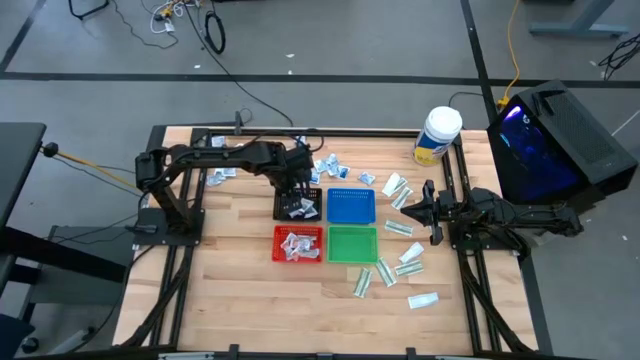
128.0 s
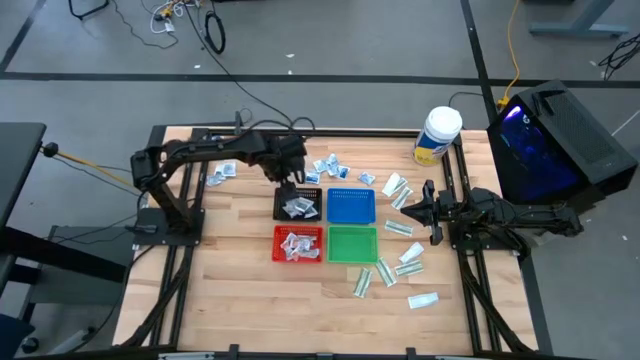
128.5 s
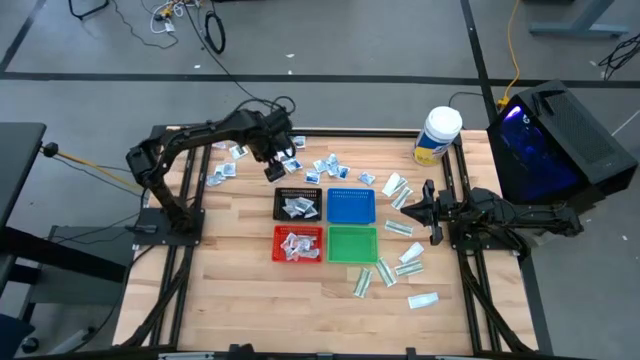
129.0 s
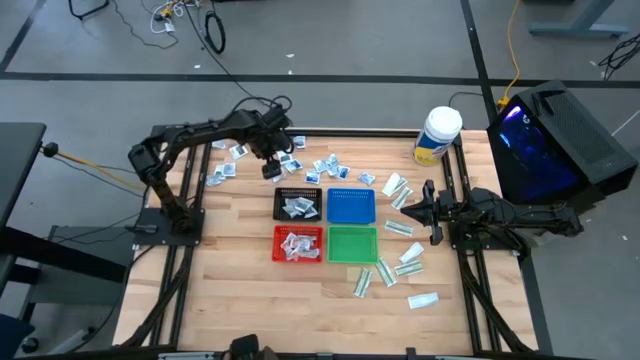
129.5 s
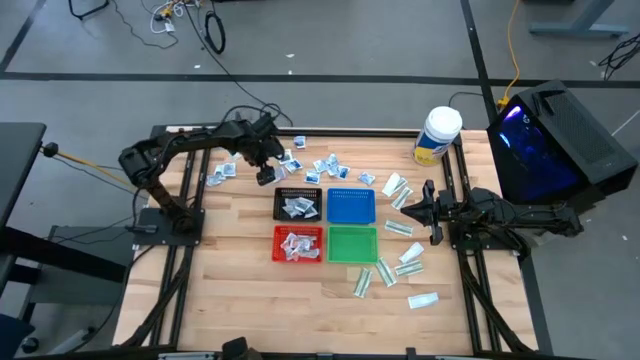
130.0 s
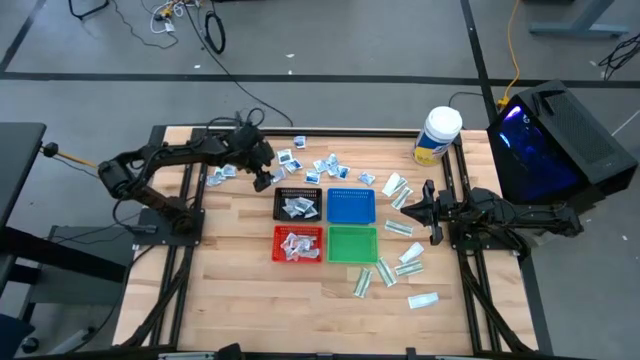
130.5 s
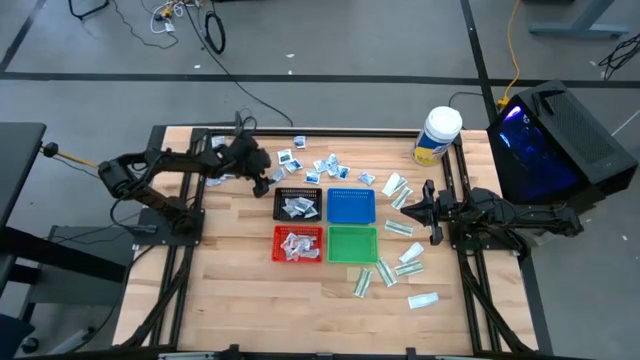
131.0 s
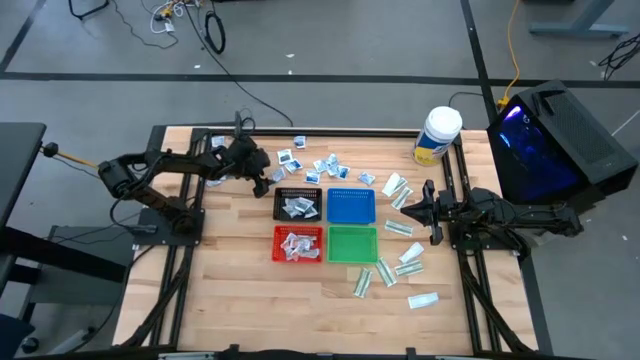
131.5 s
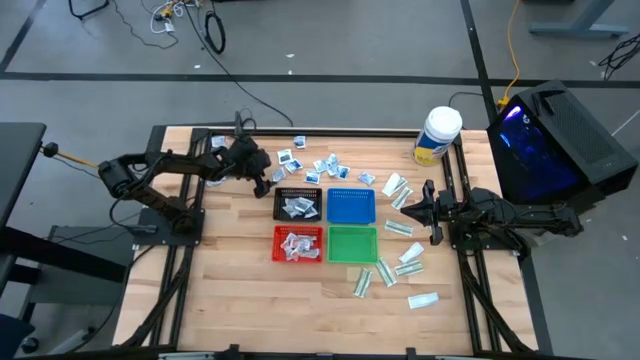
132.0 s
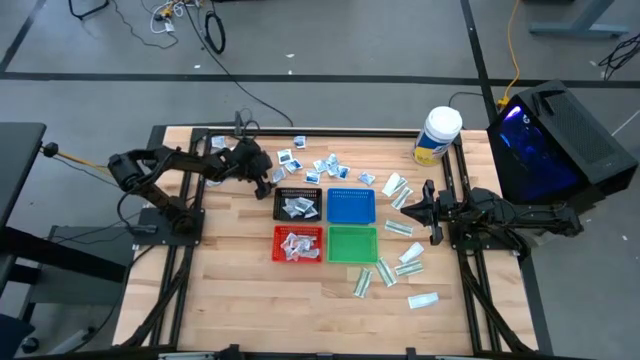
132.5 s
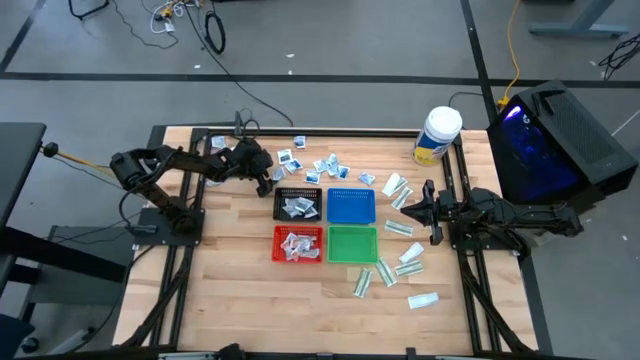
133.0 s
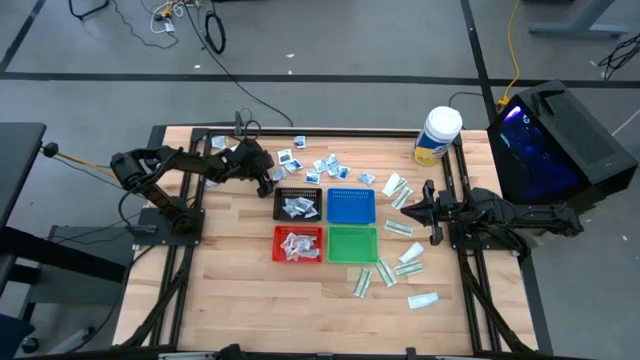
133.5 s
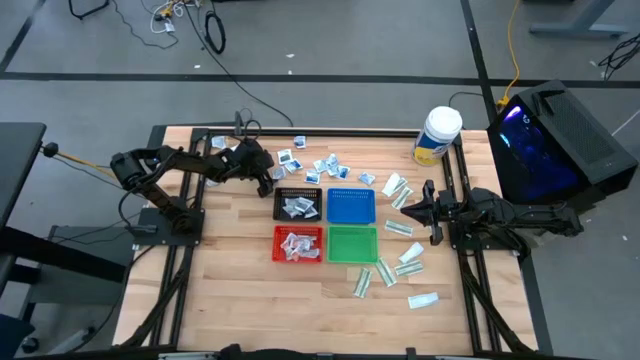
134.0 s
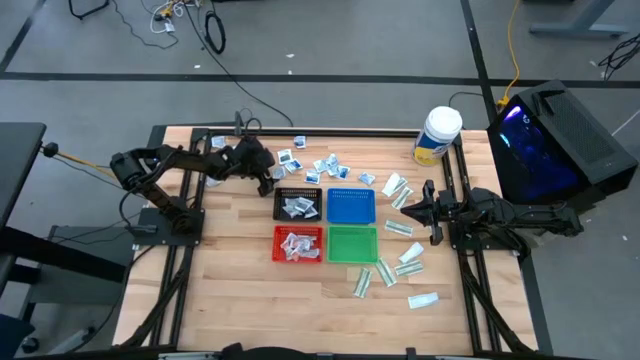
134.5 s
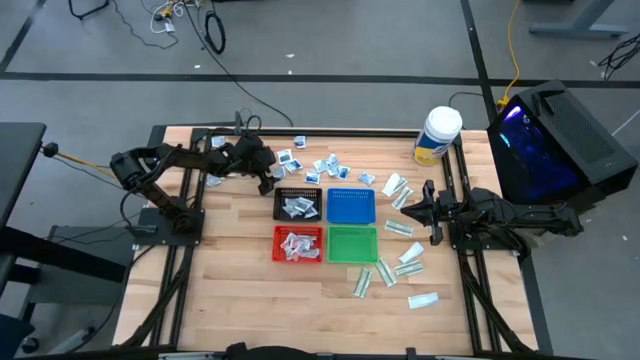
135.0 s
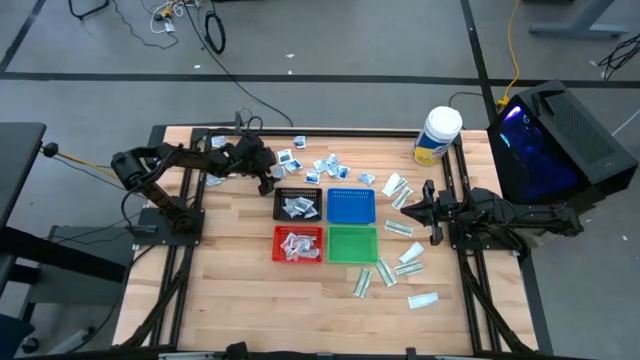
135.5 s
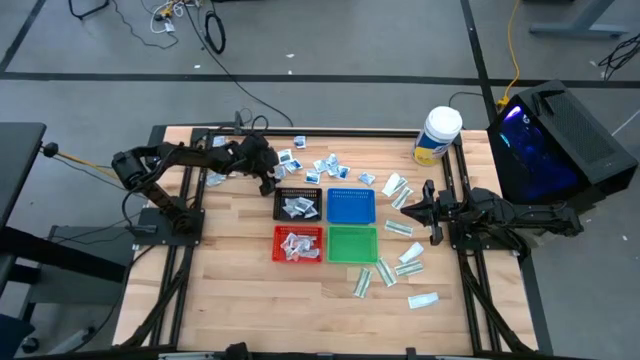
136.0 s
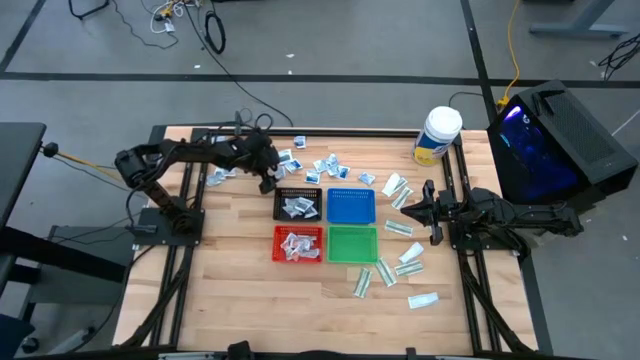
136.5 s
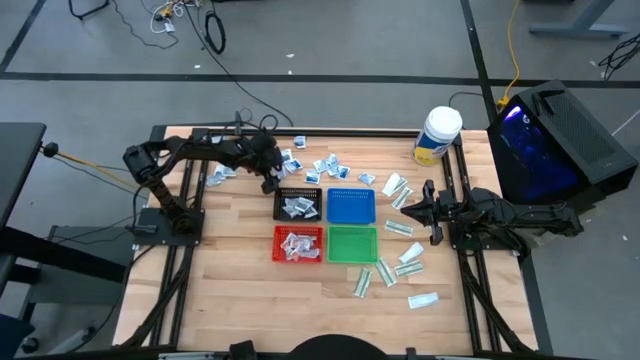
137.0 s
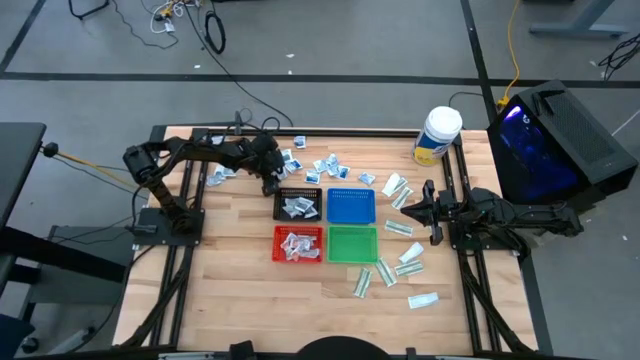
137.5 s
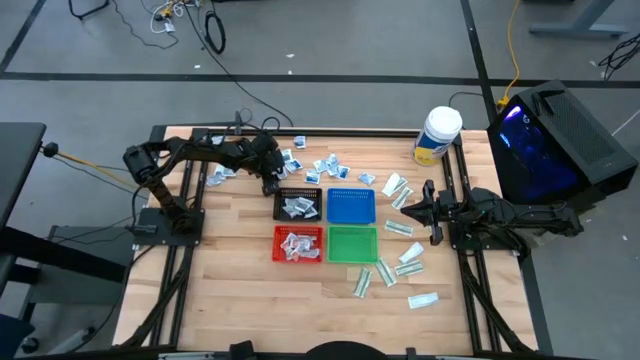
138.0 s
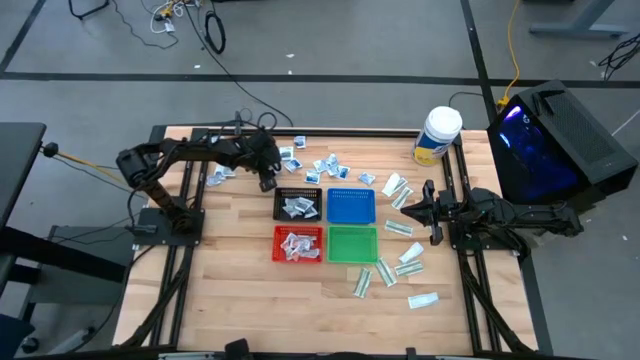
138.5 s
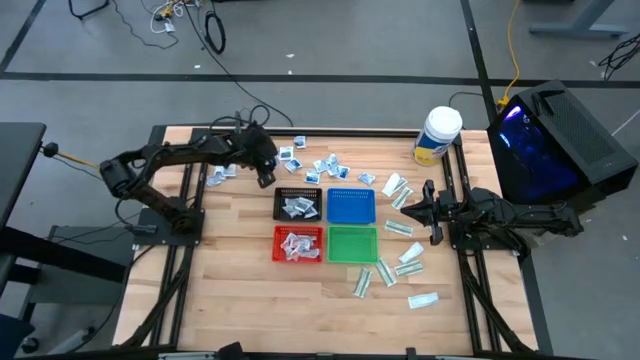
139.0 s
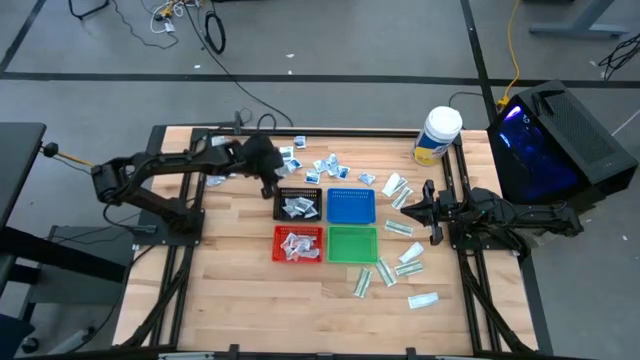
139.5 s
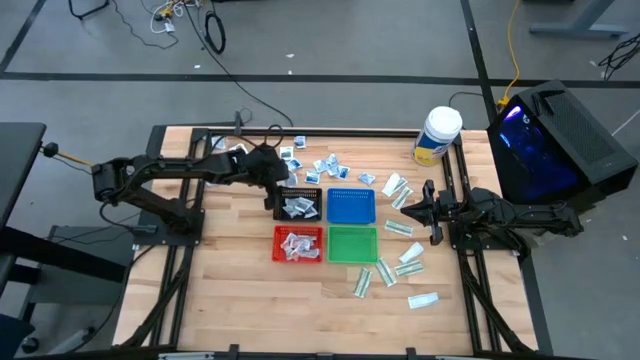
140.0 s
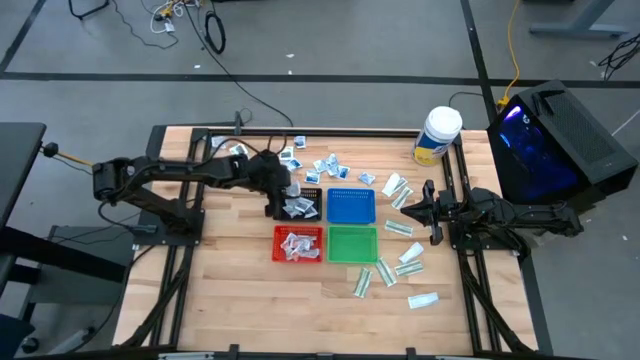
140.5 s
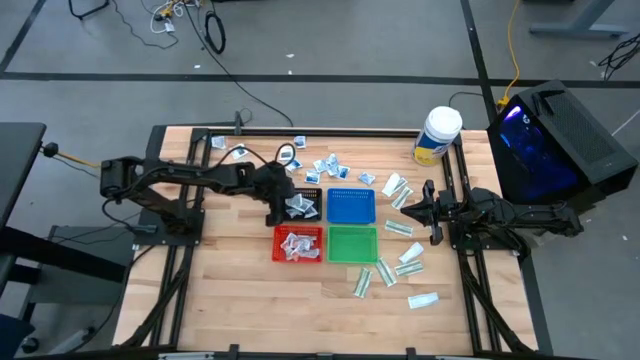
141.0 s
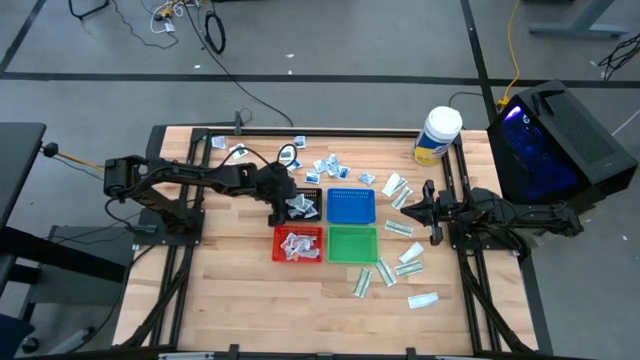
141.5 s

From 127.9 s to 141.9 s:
Task: Pick & Place First Aid Supplies
Put the gray towelette pack into the black bin

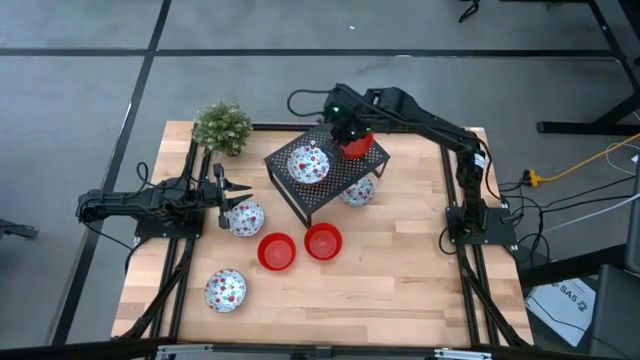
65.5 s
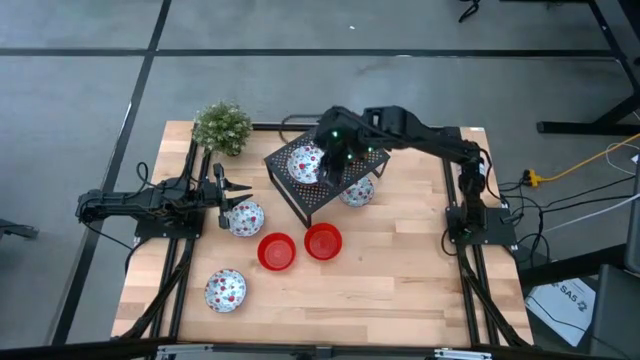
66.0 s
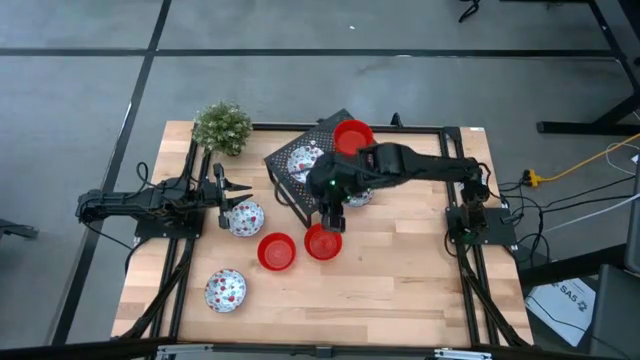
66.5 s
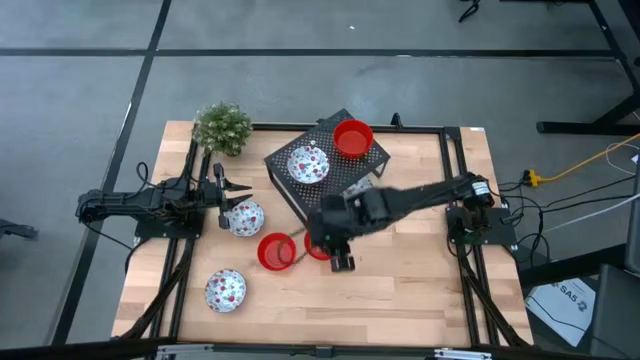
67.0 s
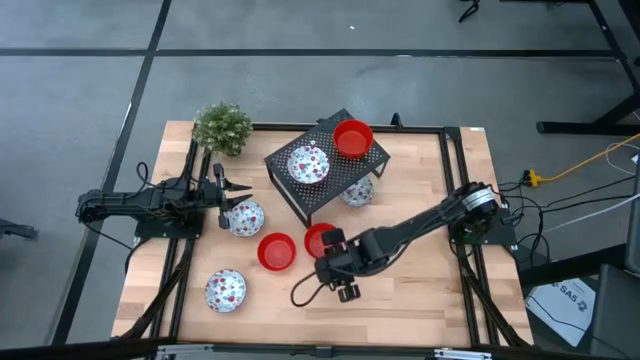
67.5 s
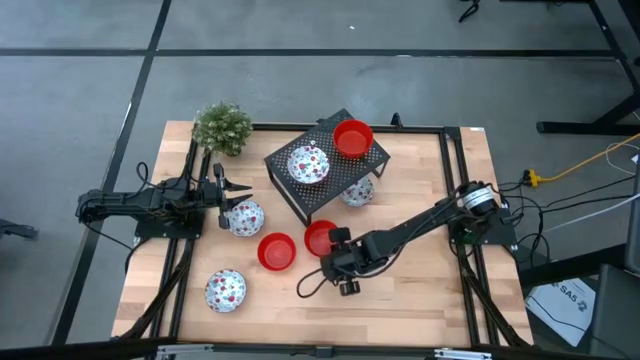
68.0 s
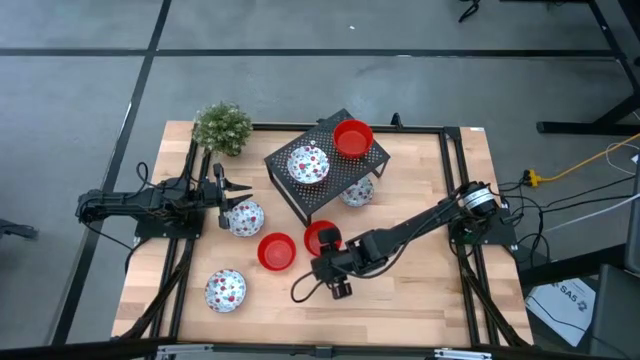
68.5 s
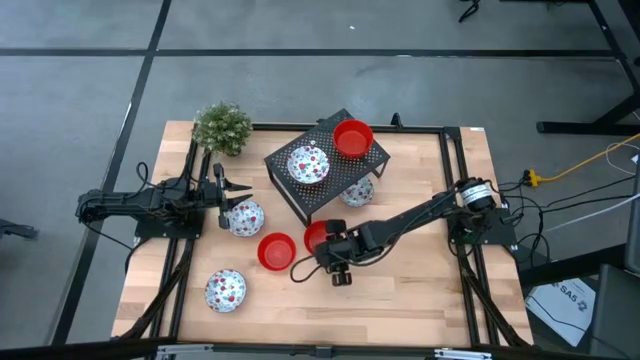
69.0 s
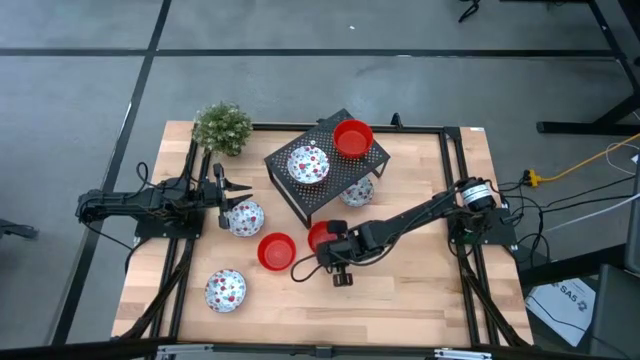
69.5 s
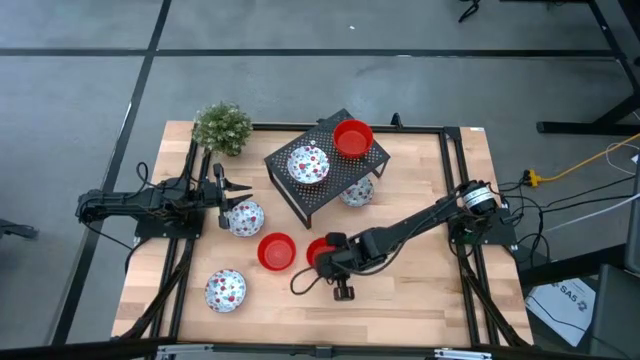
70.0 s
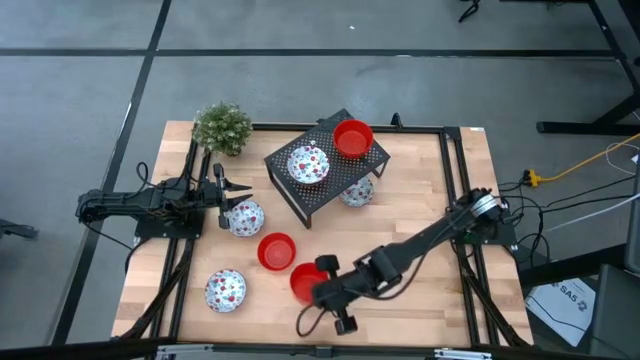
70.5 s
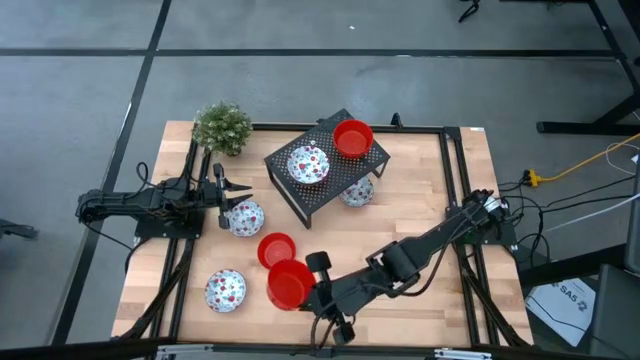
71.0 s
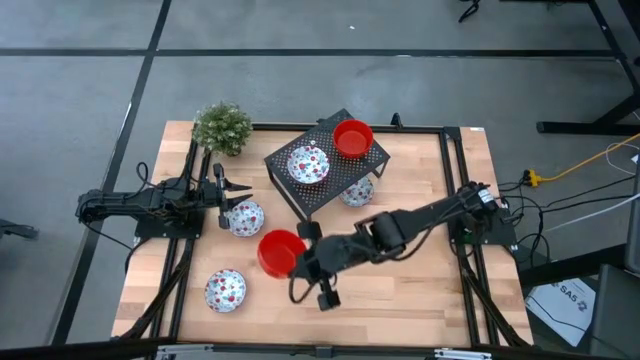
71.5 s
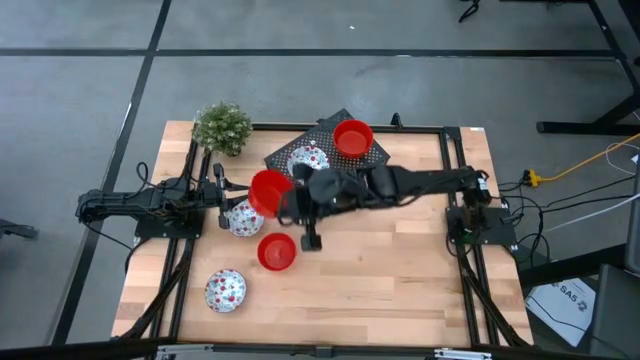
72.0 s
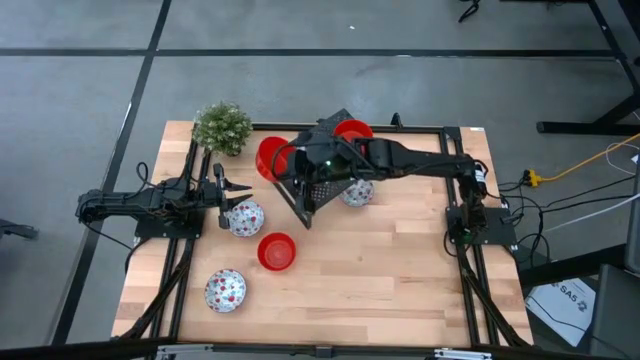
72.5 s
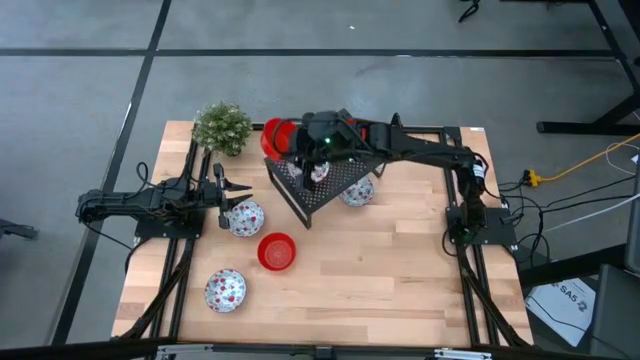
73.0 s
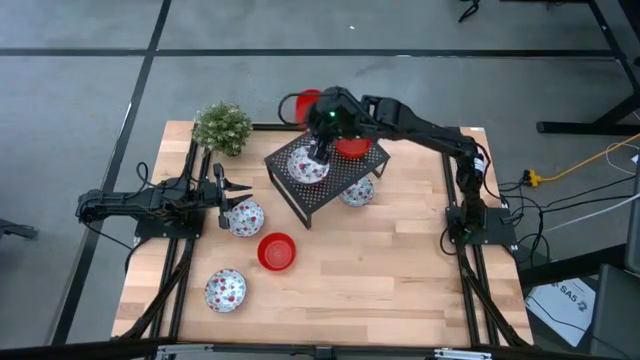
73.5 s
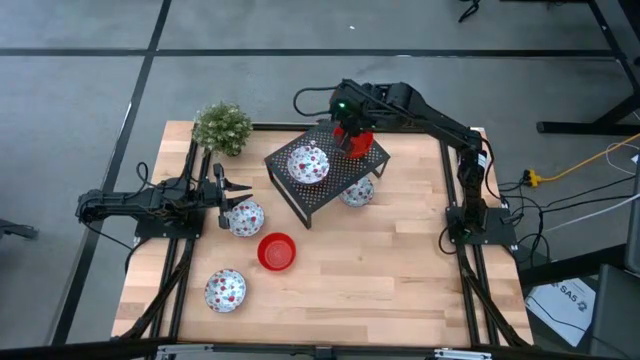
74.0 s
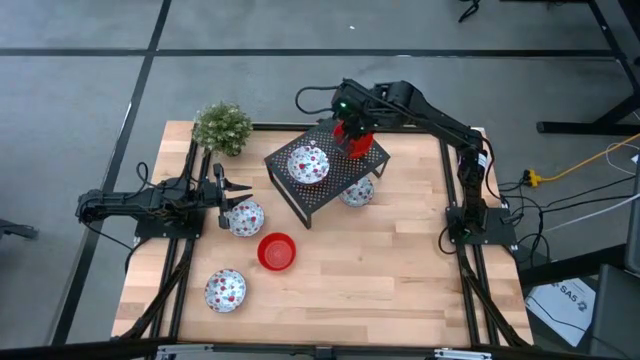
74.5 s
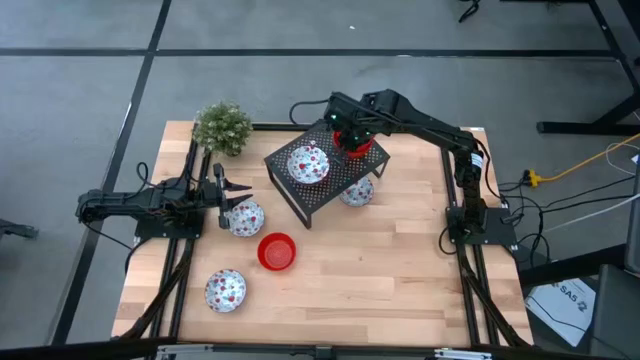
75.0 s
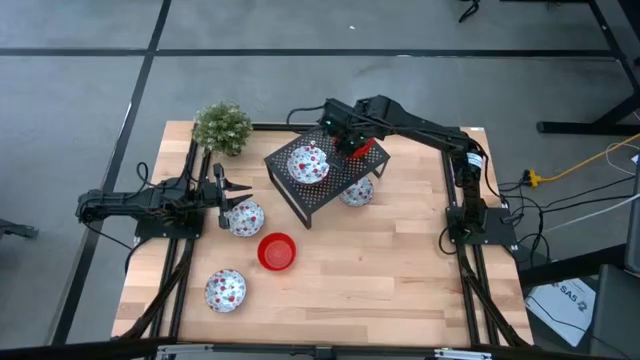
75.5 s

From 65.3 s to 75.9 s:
Task: Pick & Place Mini bowls
Stack the red bowl on the red bowl on the shelf
